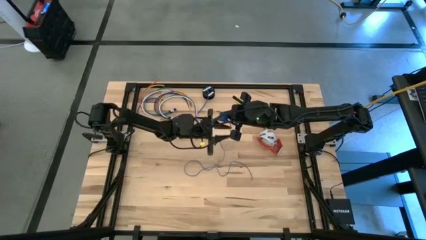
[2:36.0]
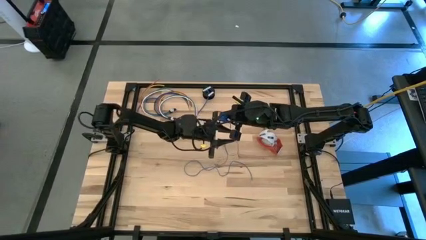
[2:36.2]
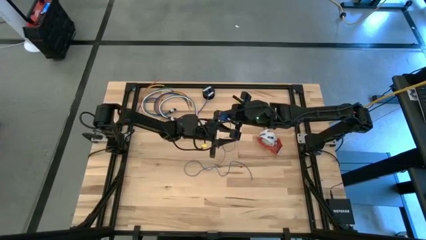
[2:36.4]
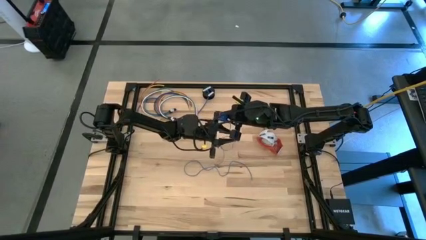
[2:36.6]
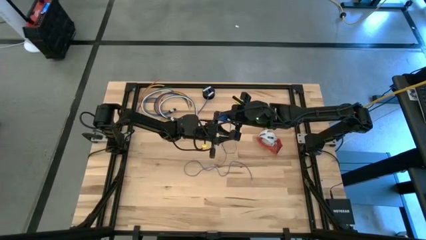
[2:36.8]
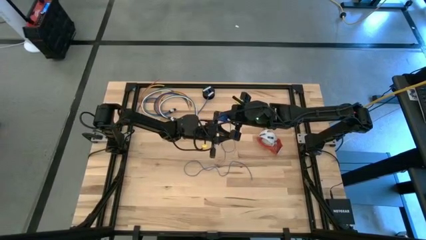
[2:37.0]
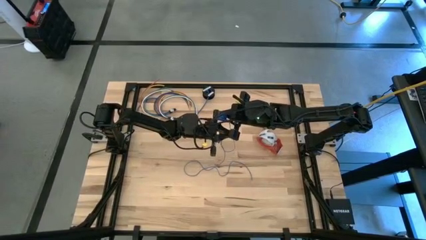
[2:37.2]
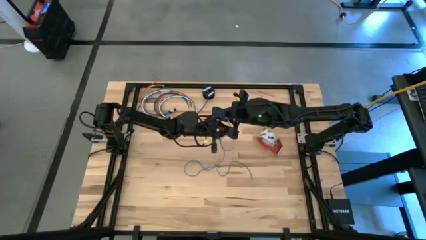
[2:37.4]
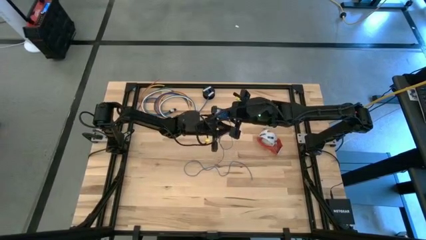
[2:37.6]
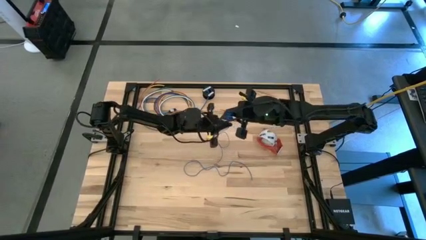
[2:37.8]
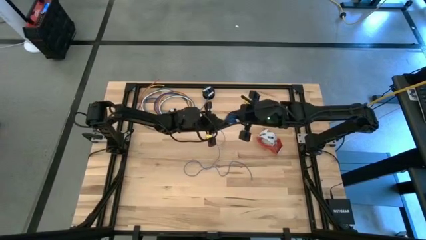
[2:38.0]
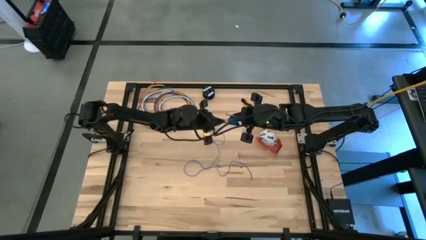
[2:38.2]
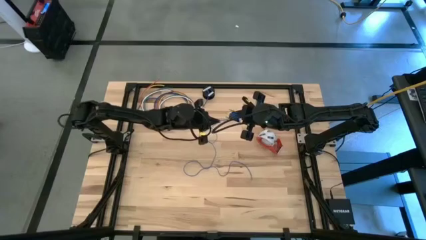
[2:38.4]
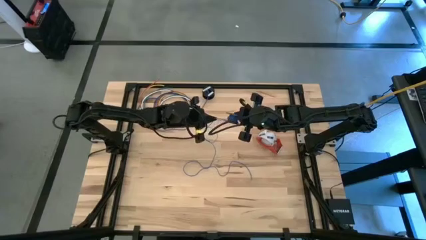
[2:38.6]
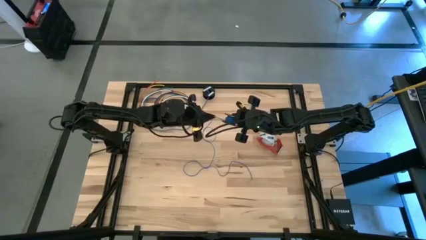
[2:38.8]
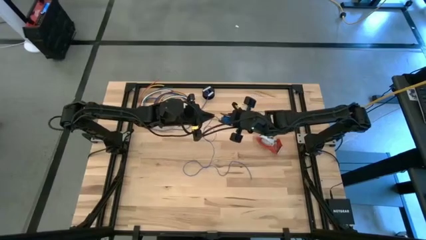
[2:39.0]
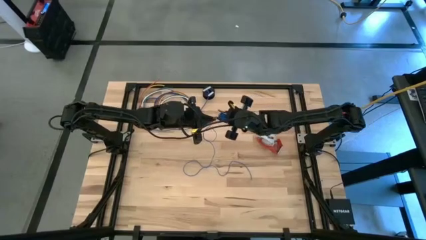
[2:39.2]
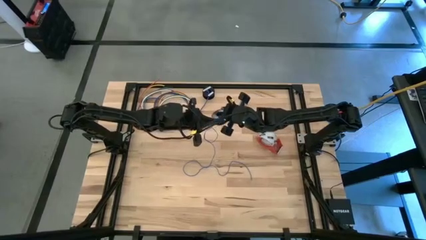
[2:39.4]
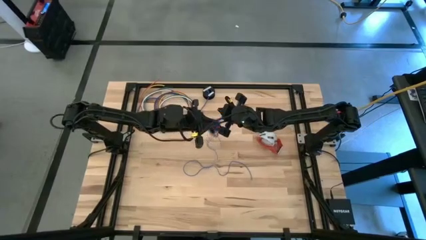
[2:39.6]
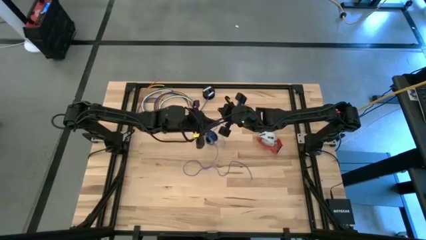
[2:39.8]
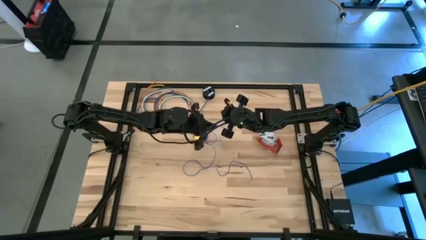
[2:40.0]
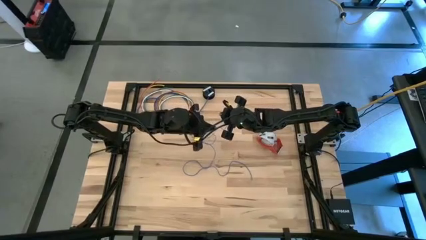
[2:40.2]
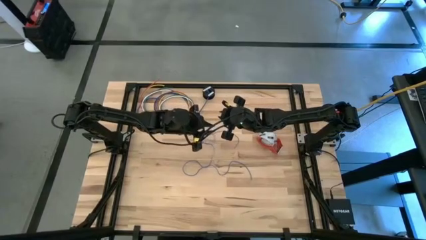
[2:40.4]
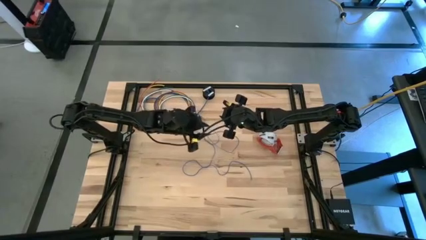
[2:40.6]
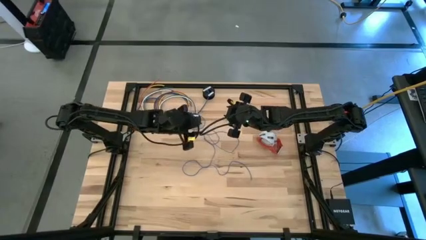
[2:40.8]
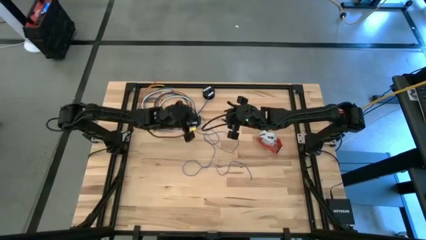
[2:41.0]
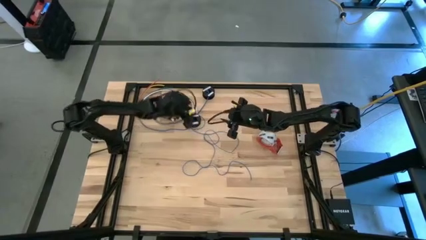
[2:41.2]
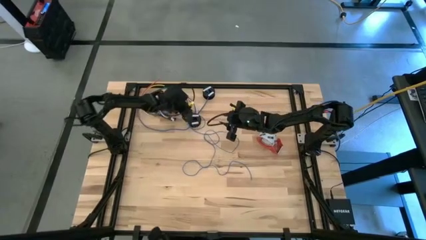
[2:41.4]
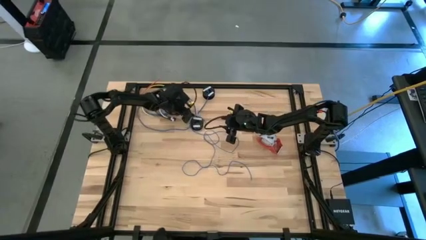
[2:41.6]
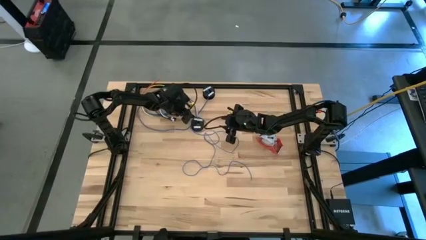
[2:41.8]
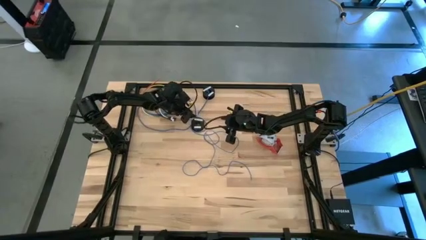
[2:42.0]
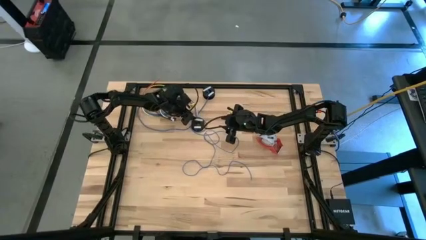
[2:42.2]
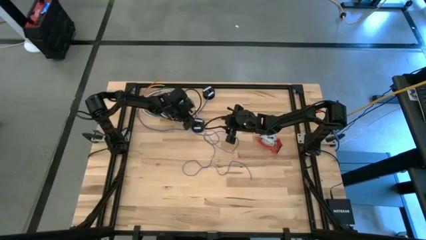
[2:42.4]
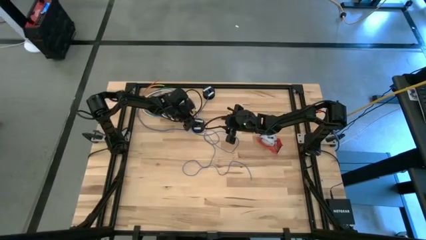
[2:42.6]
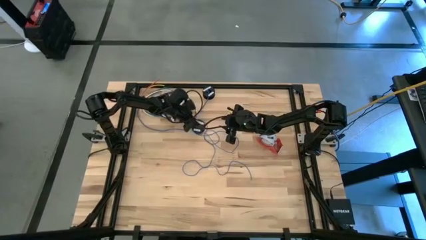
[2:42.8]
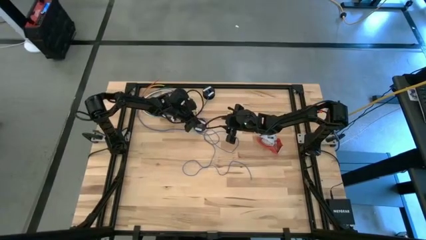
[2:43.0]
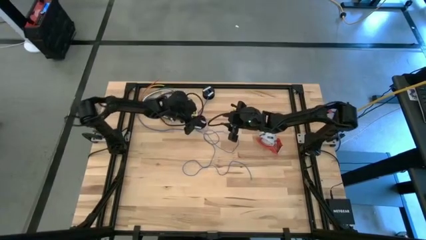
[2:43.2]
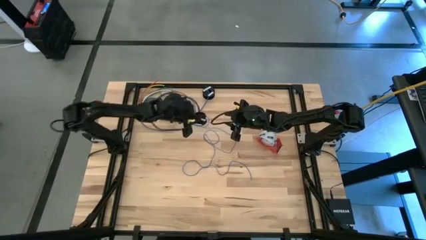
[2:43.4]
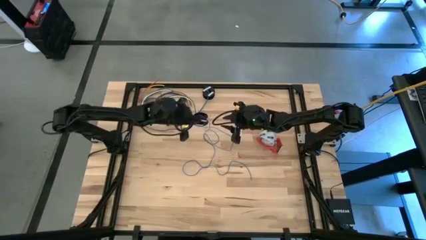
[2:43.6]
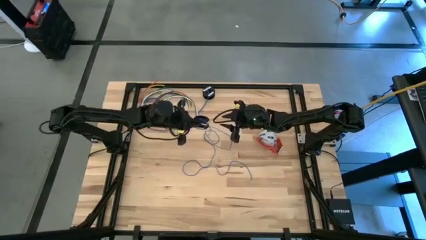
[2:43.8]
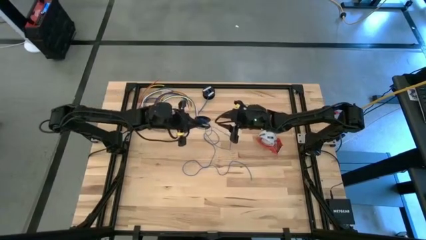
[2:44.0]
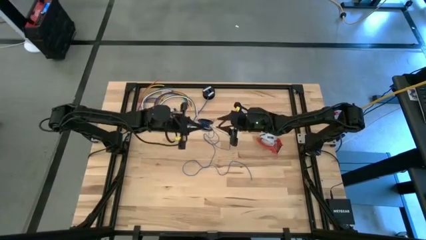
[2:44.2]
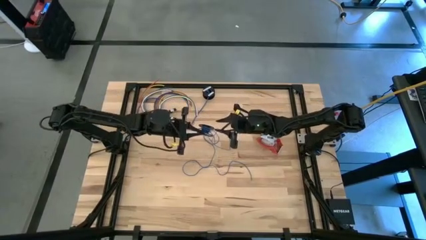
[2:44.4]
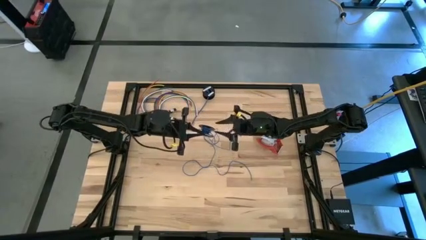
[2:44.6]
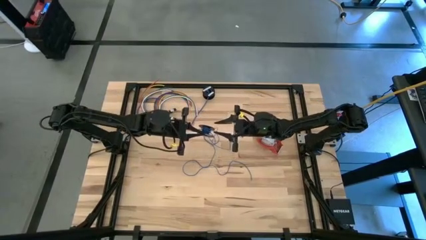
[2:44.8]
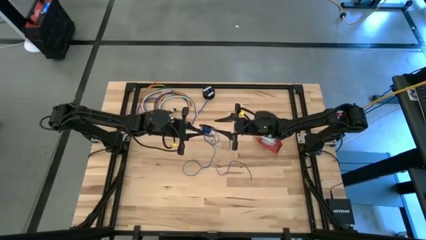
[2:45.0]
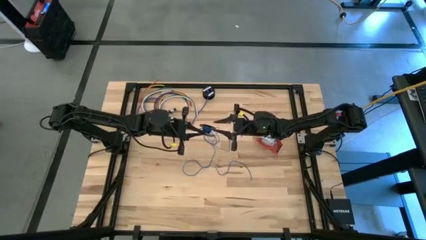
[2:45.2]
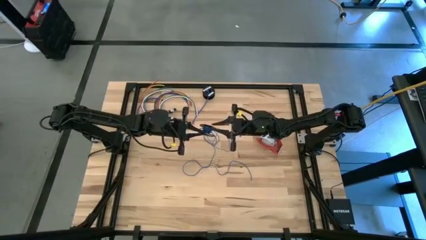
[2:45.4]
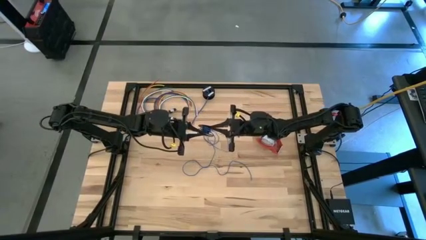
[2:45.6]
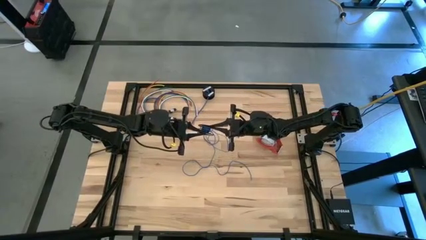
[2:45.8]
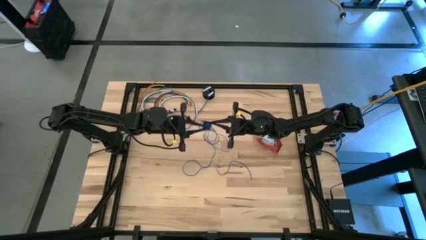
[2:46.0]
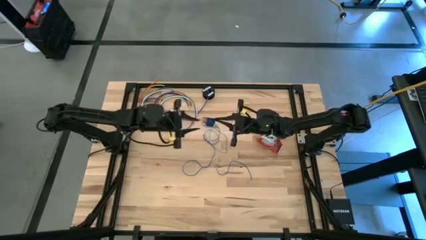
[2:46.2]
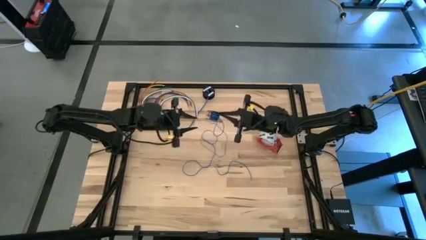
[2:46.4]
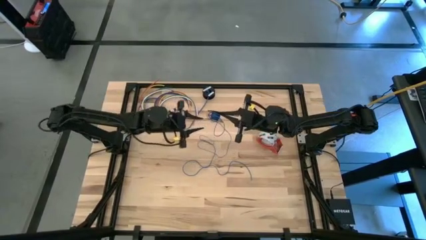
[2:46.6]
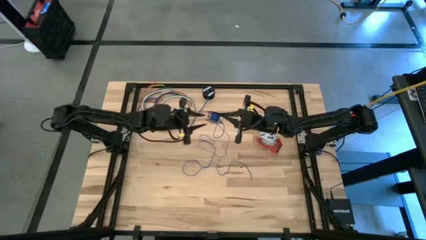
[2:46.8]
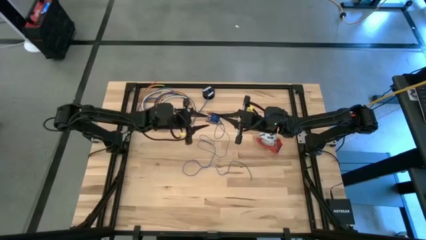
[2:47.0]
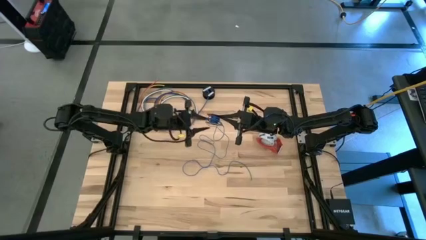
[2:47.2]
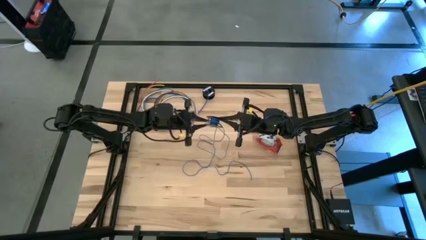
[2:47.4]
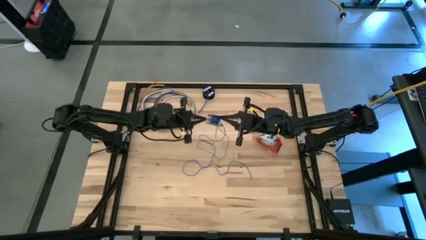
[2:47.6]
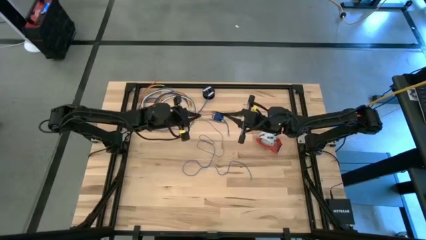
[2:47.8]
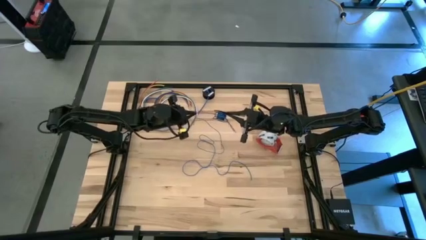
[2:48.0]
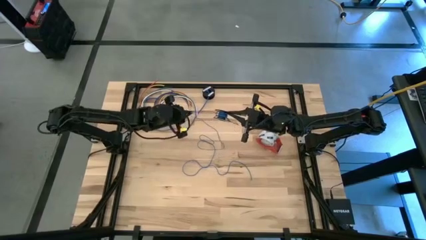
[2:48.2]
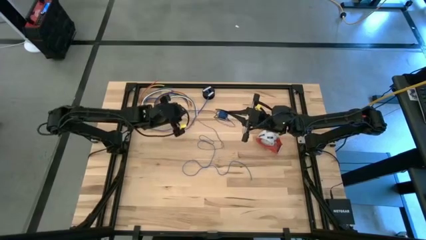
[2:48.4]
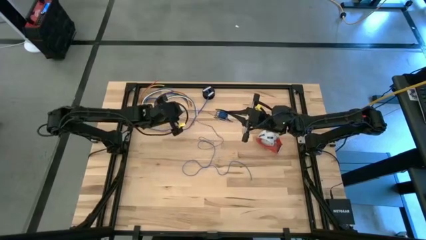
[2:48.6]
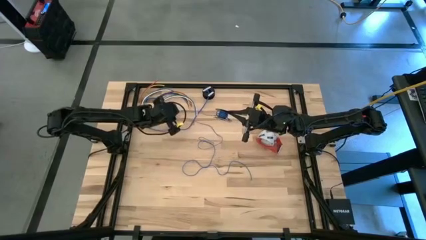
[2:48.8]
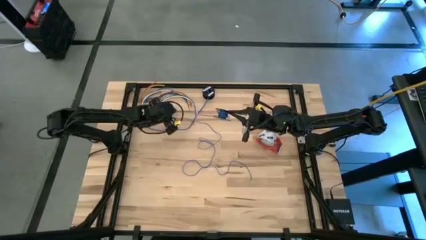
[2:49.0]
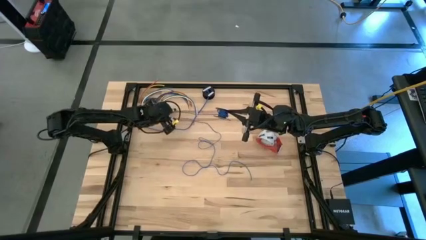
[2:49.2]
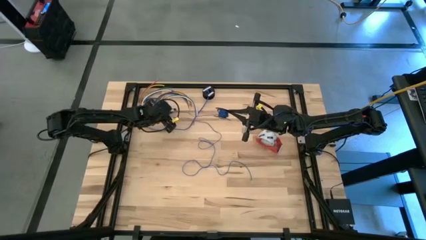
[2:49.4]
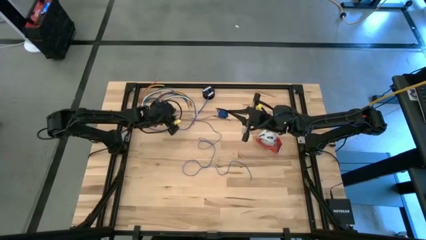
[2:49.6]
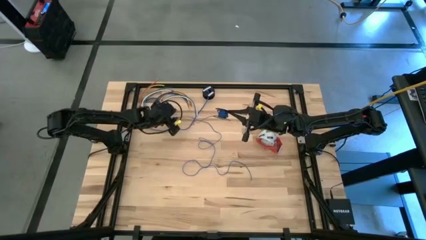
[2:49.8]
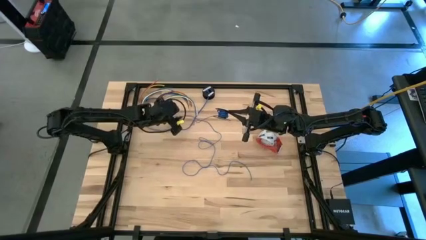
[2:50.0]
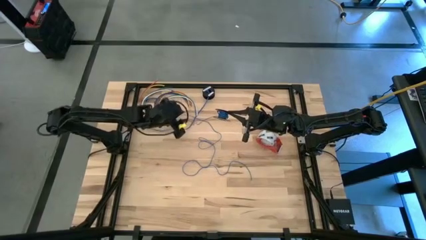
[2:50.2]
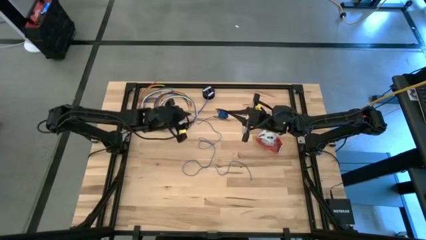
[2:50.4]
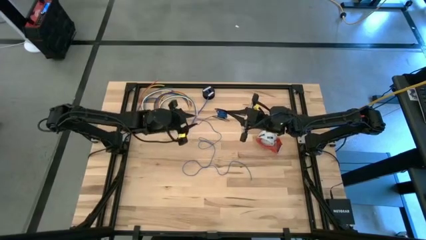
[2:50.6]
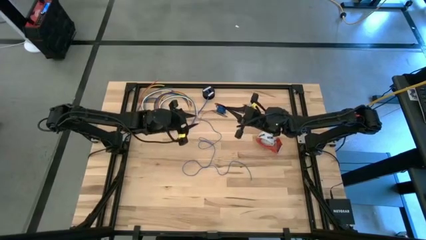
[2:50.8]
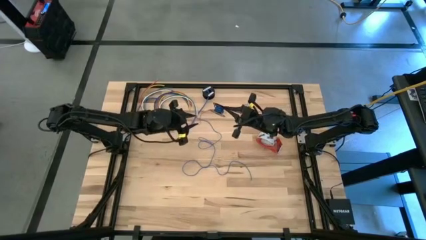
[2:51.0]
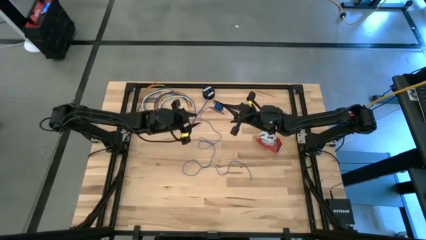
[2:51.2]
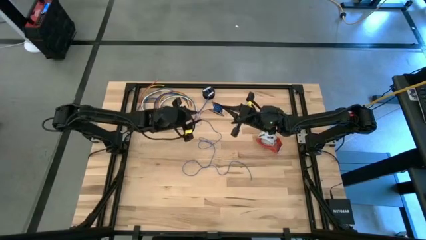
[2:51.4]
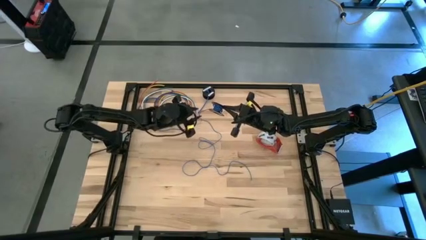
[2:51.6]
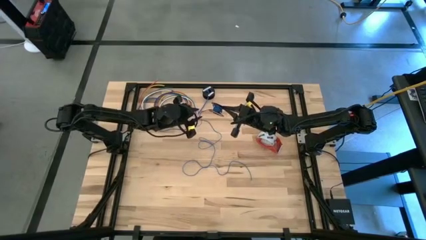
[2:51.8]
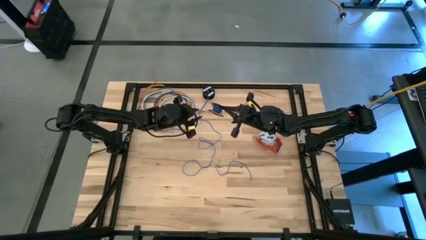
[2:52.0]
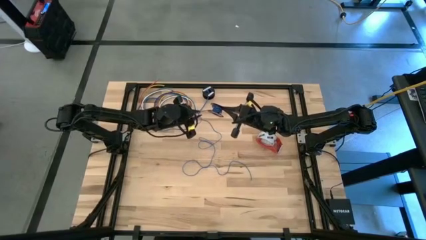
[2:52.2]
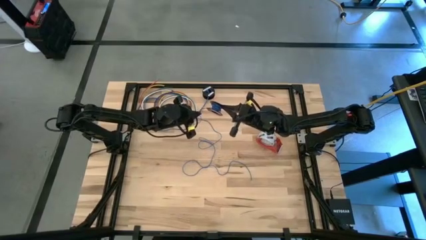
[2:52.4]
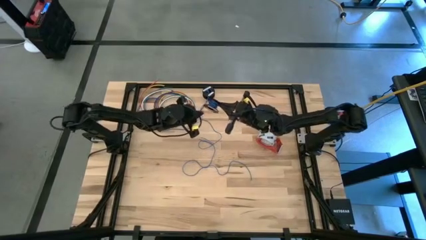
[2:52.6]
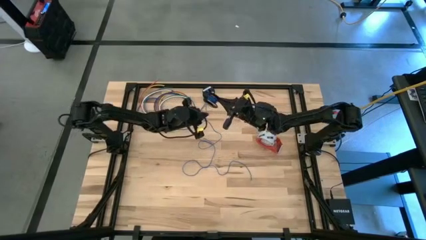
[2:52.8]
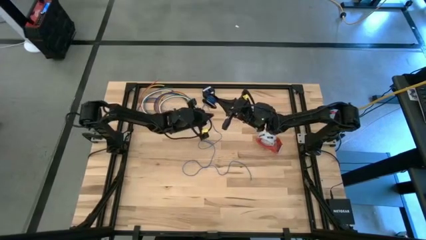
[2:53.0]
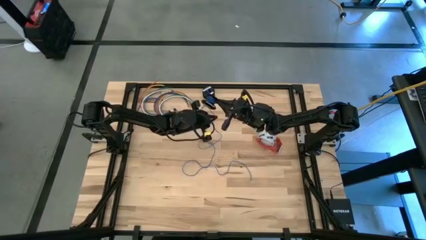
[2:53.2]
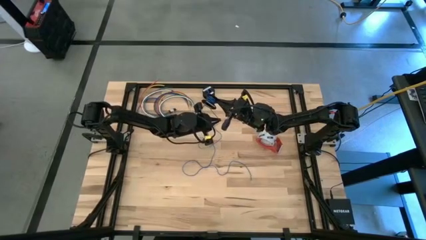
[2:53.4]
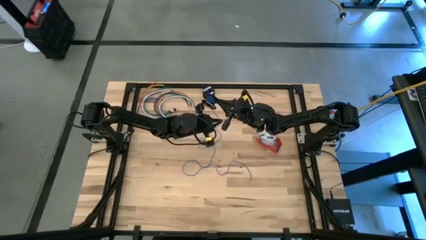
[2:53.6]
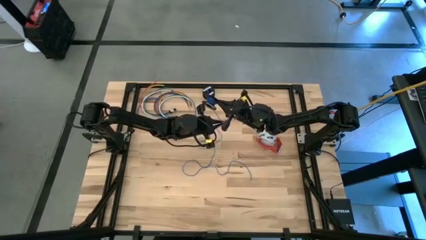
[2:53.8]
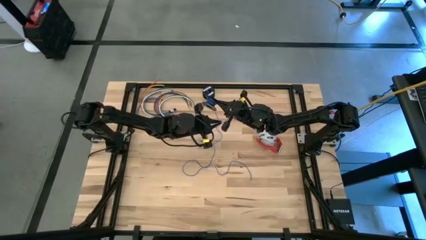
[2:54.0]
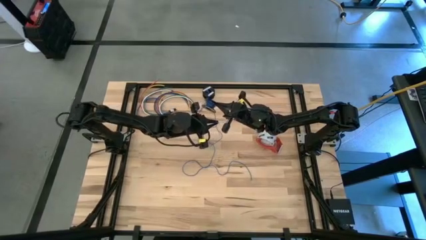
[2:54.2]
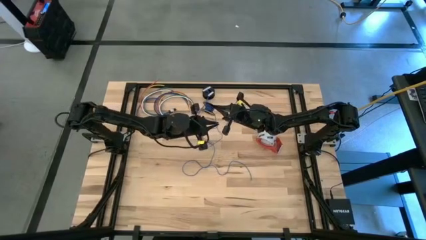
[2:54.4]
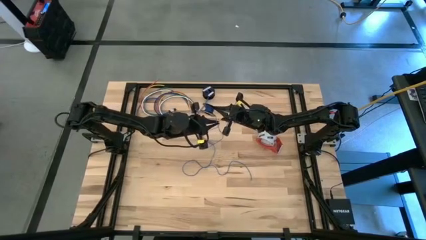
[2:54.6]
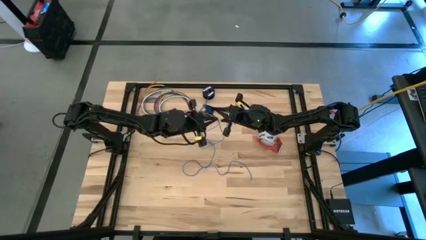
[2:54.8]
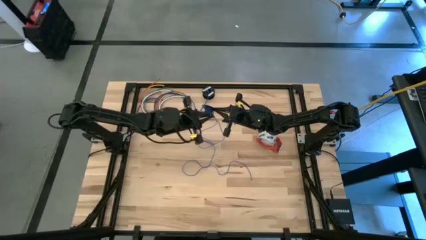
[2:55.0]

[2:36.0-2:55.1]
Task: Coil cords
Coil the blue wire onto the spool
